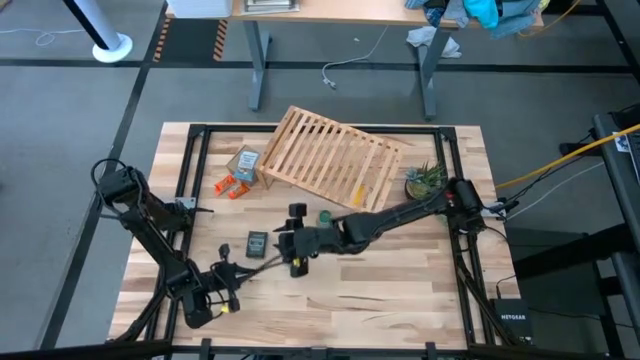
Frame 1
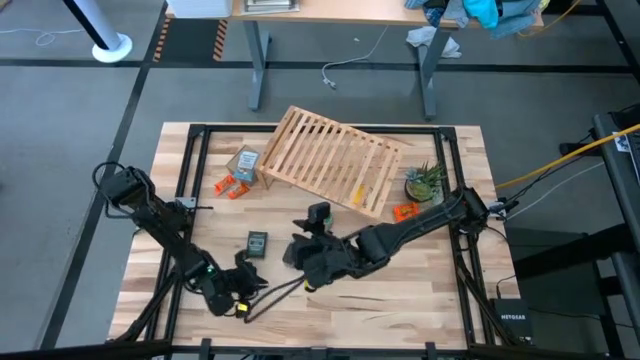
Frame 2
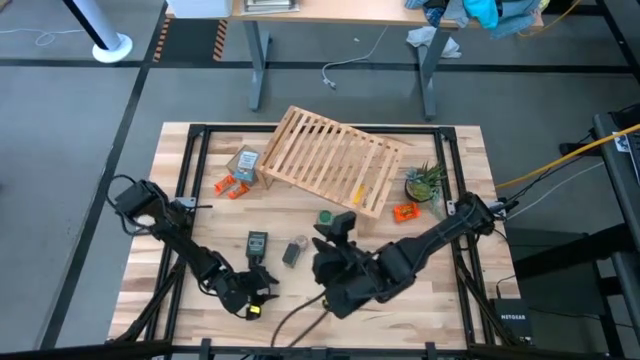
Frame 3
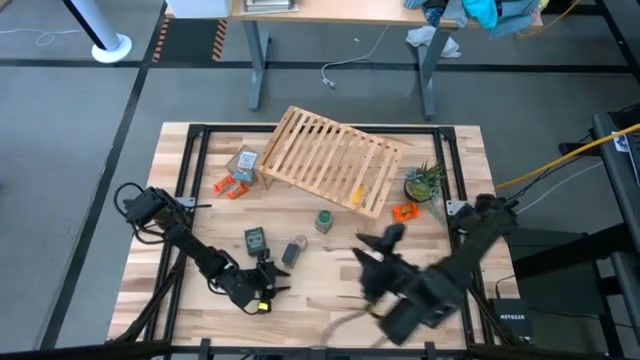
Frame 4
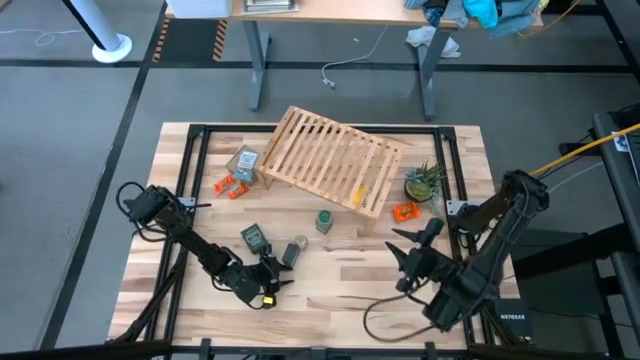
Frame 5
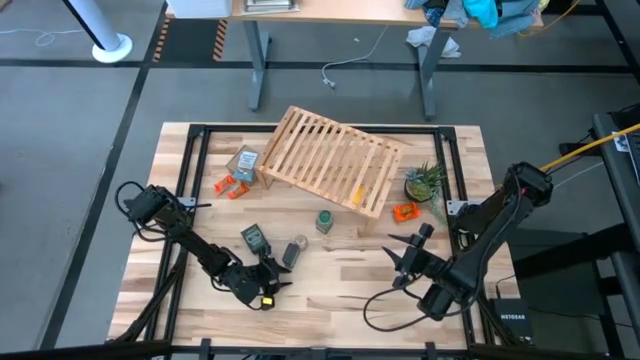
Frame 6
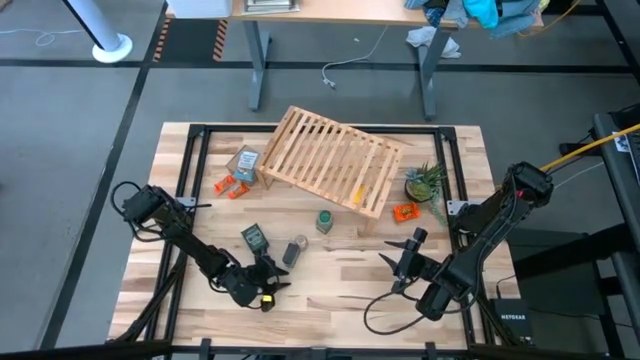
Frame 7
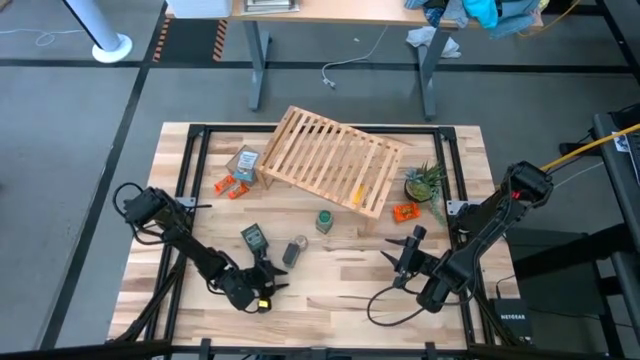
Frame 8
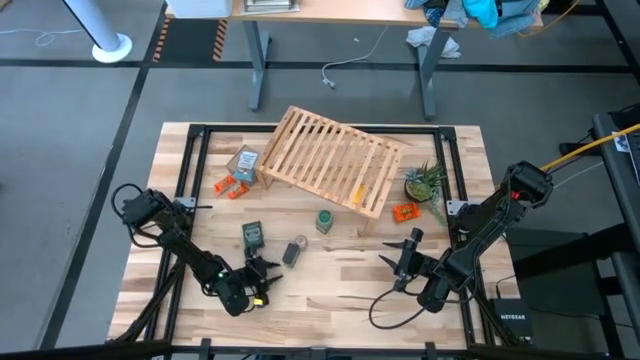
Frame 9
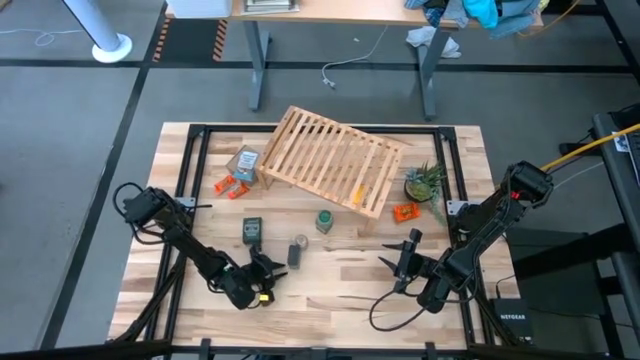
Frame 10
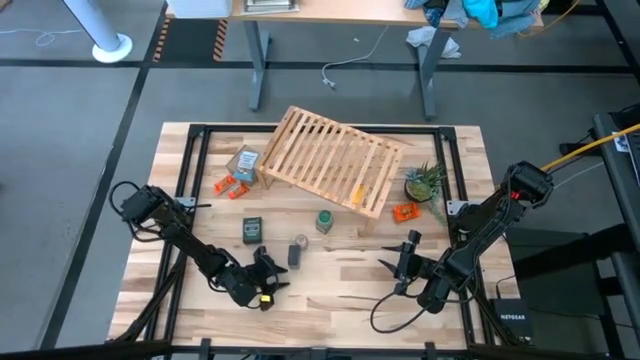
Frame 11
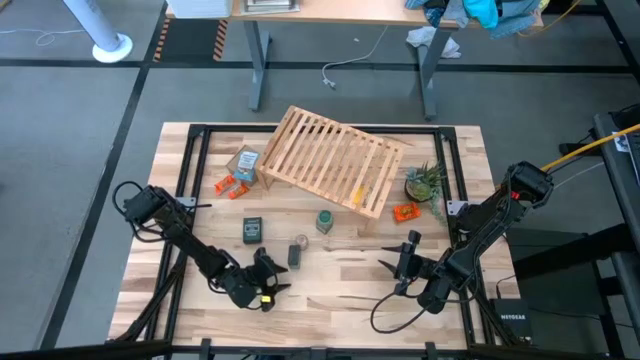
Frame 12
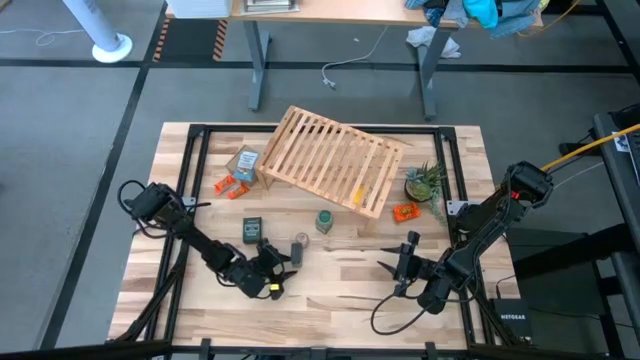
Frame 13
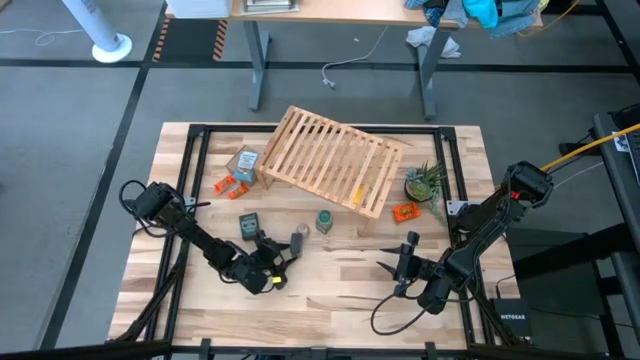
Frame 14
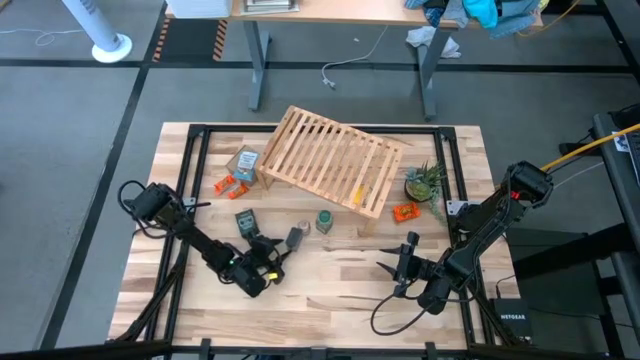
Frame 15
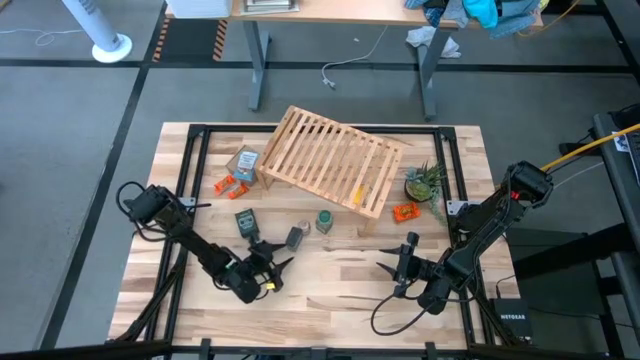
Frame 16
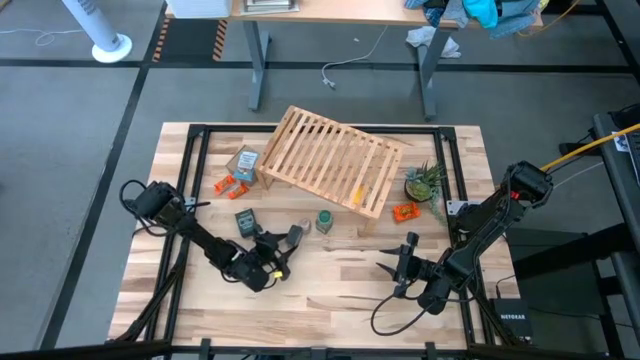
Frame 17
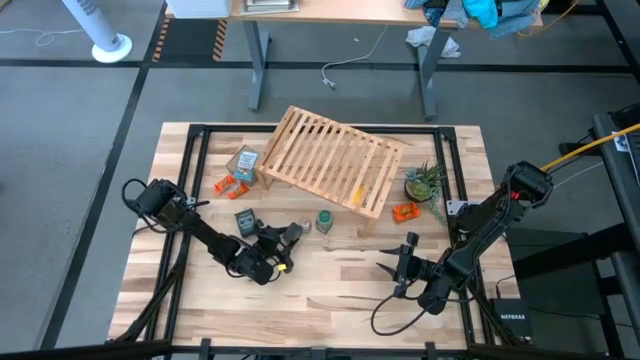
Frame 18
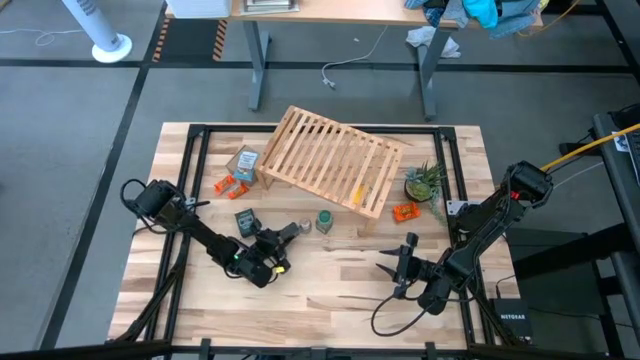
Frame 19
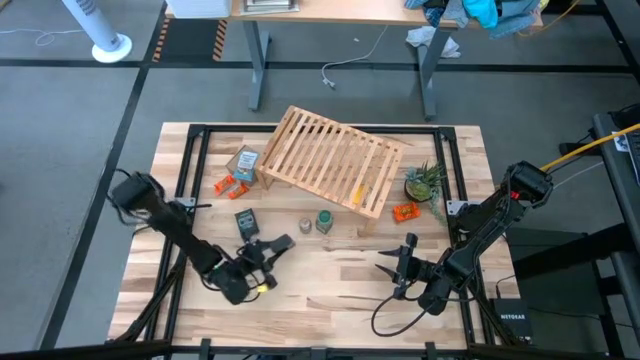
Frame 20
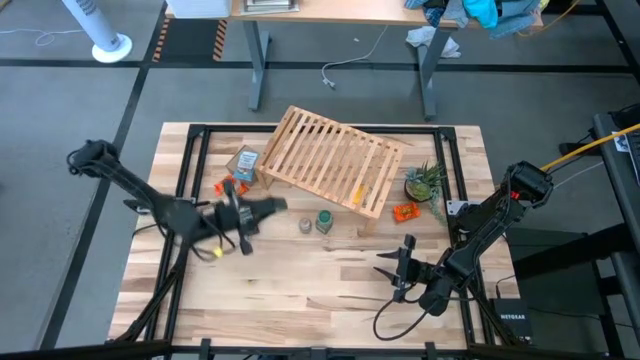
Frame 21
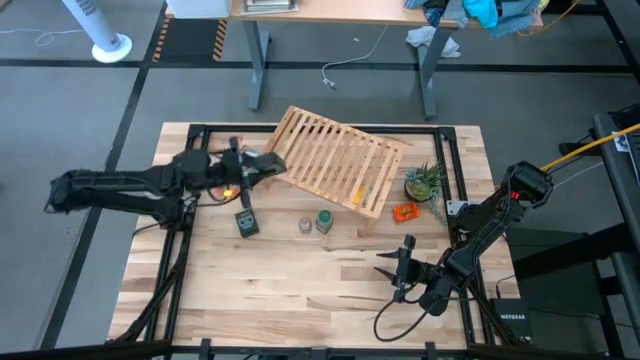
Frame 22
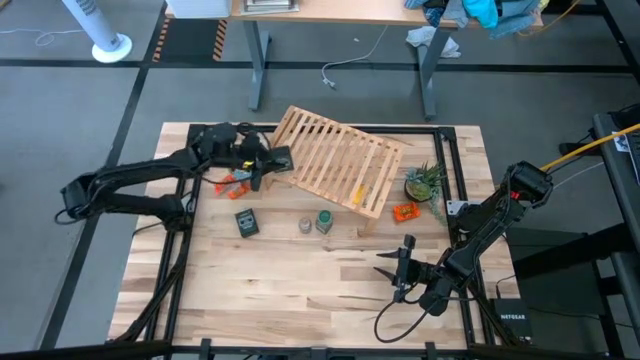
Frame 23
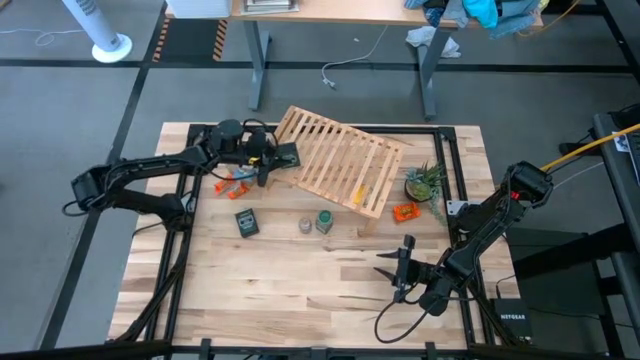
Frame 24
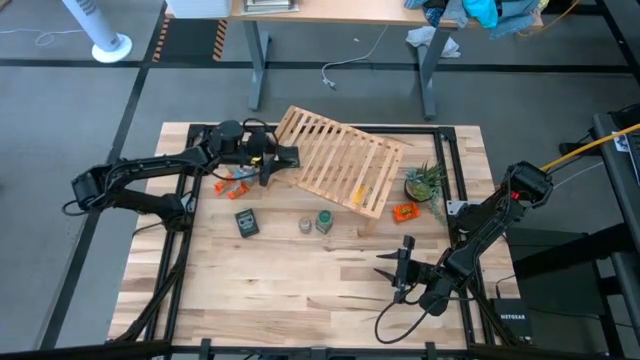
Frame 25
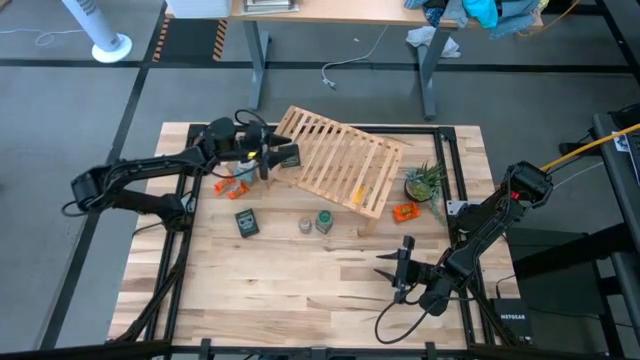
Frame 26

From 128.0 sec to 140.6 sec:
Task: Shelf spices
Put the right green seasoning can on the shelf

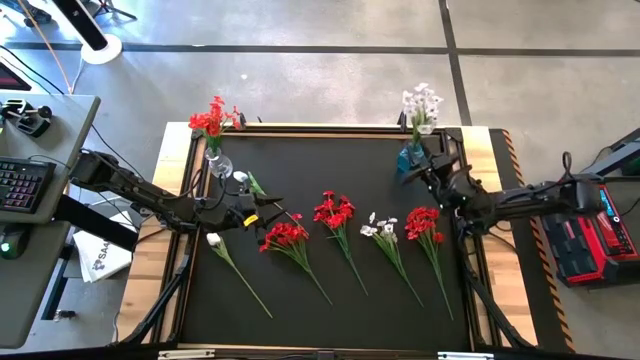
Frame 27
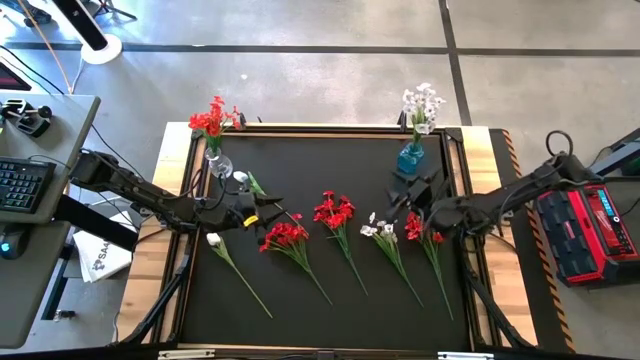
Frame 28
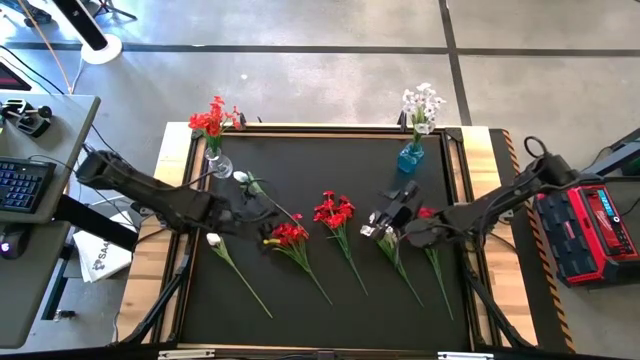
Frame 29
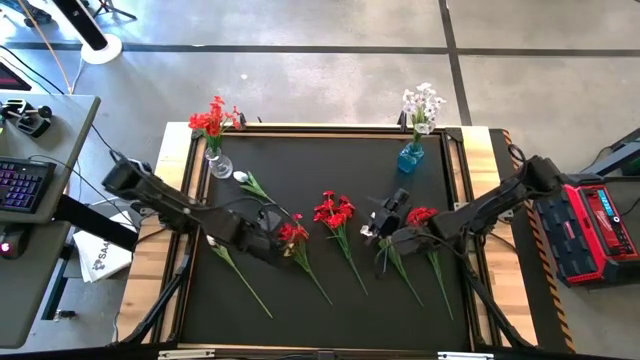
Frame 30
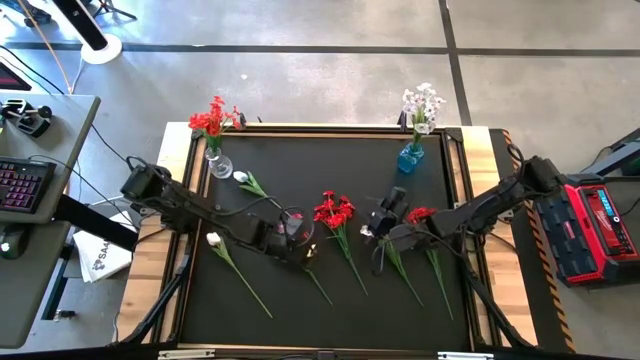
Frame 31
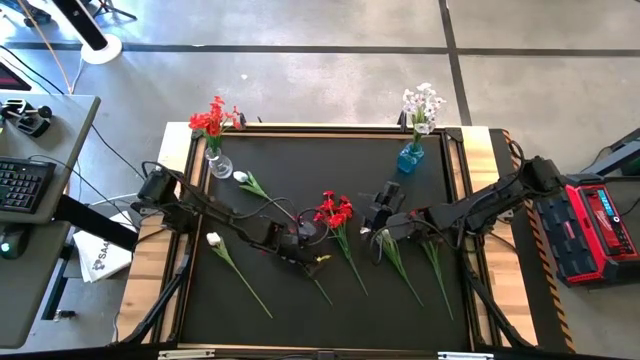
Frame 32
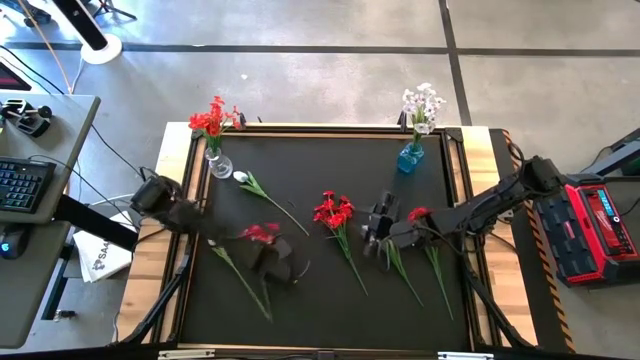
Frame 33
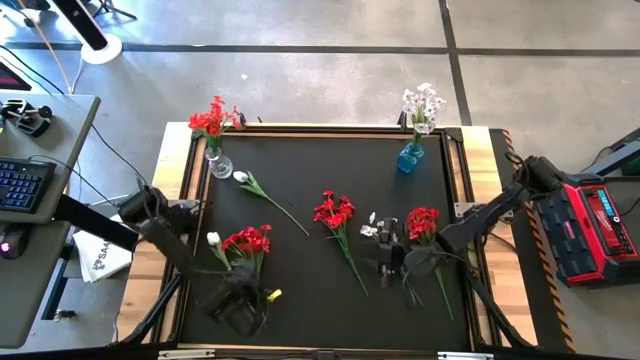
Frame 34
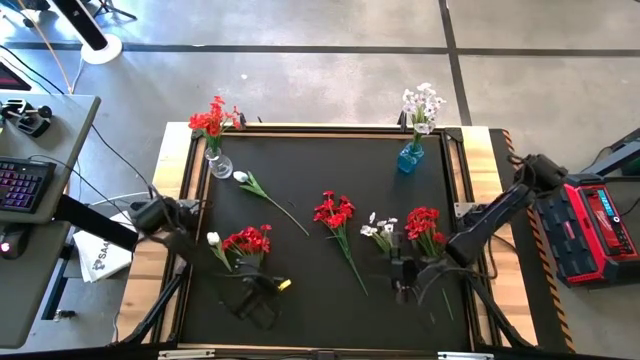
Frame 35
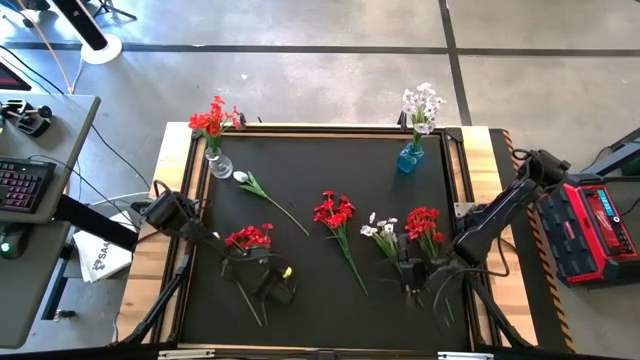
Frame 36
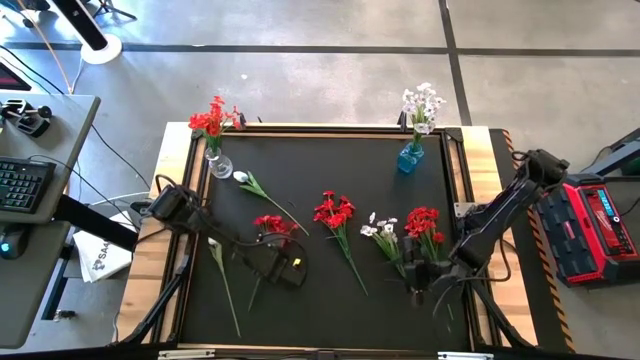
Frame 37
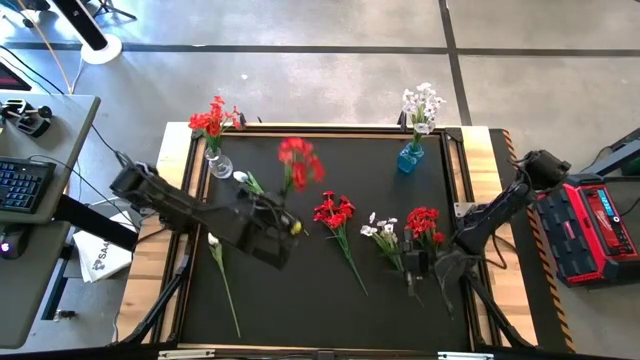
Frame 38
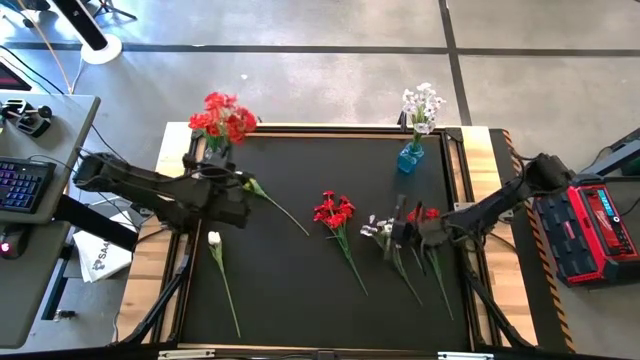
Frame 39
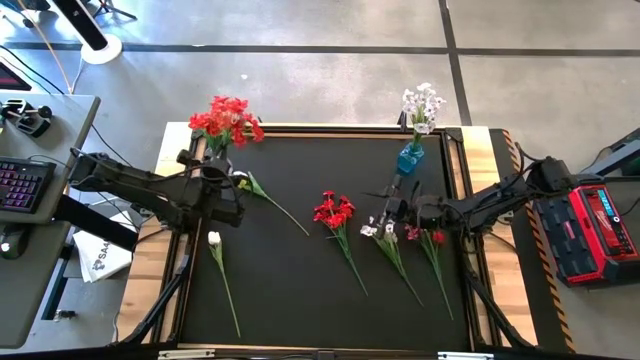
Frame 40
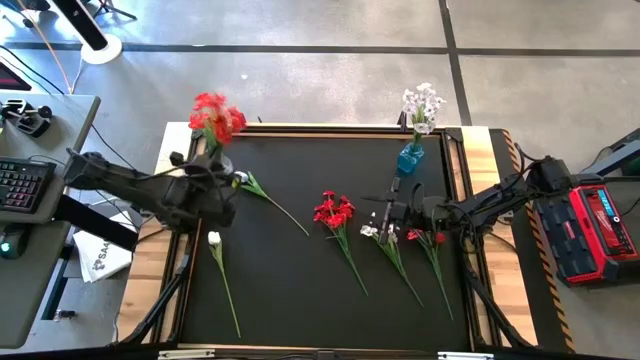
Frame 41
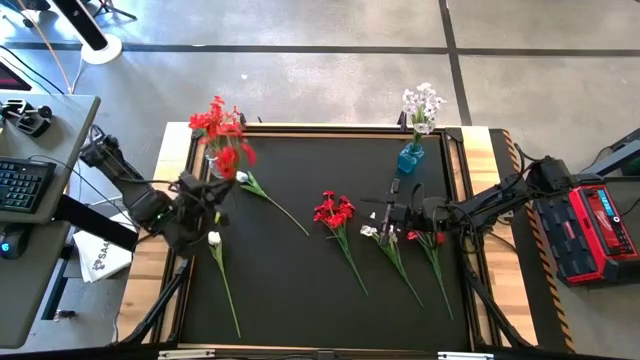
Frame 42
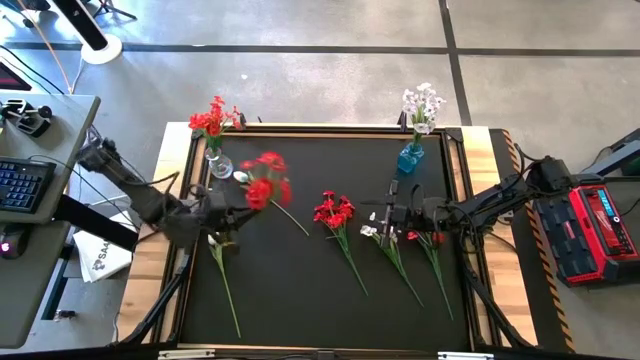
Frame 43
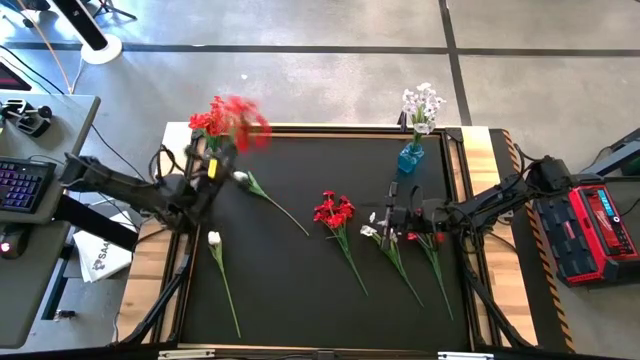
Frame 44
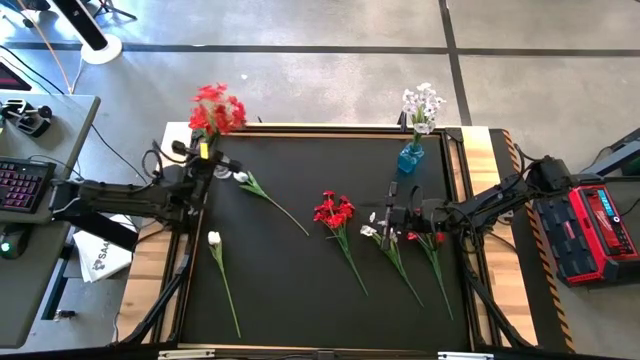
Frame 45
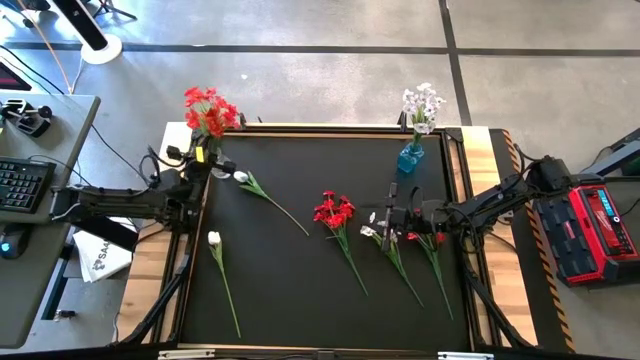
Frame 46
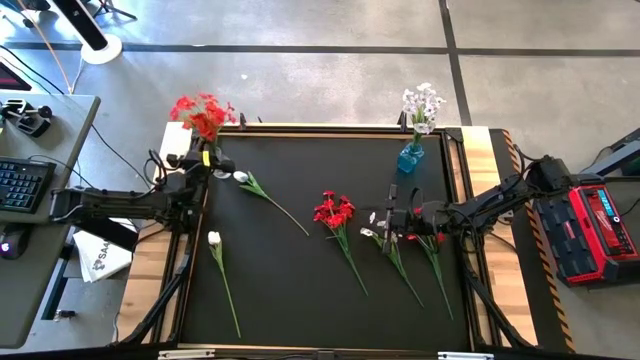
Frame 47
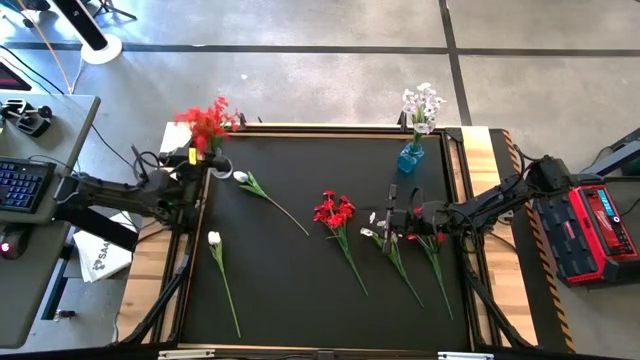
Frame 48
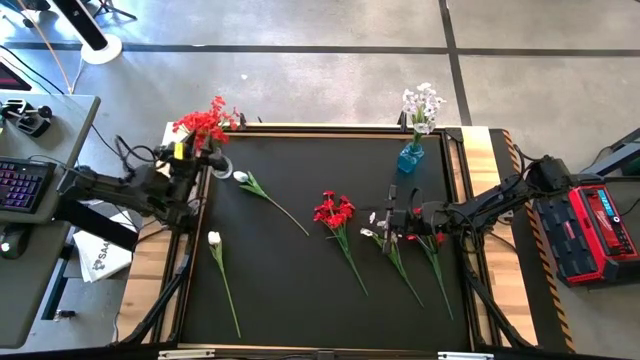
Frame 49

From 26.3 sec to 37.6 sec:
Task: Sort flowers into vase by color
Put the left red flowers into the transparent vase
